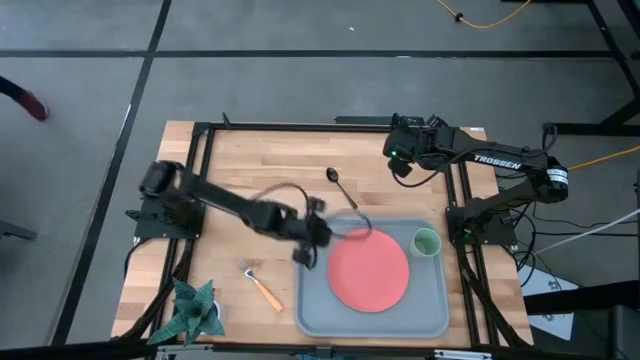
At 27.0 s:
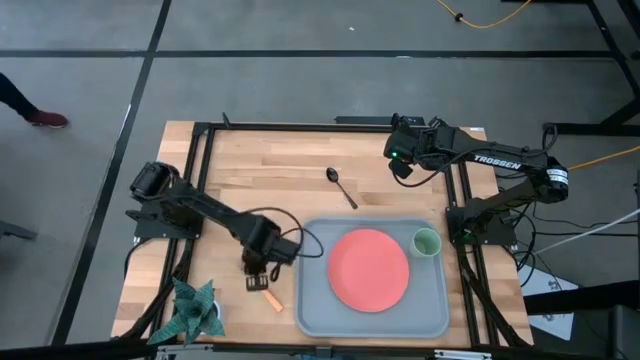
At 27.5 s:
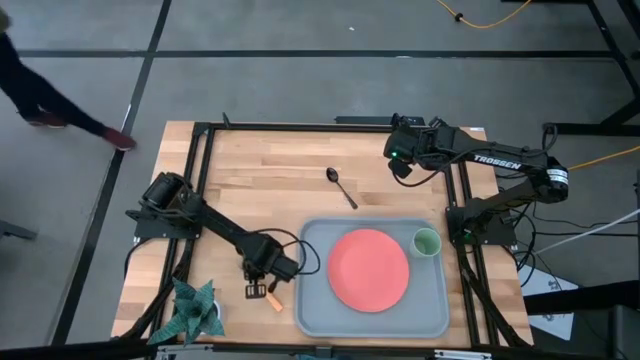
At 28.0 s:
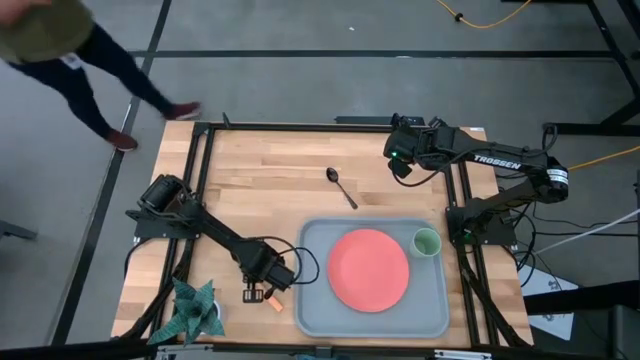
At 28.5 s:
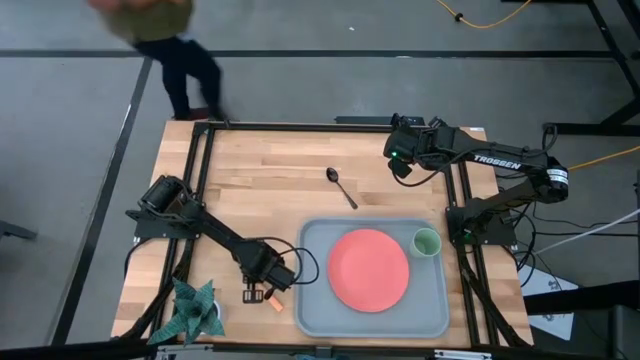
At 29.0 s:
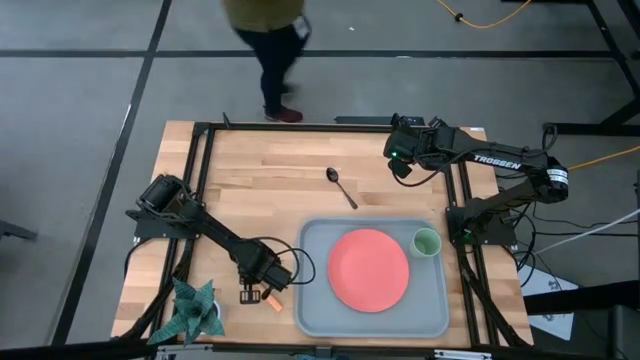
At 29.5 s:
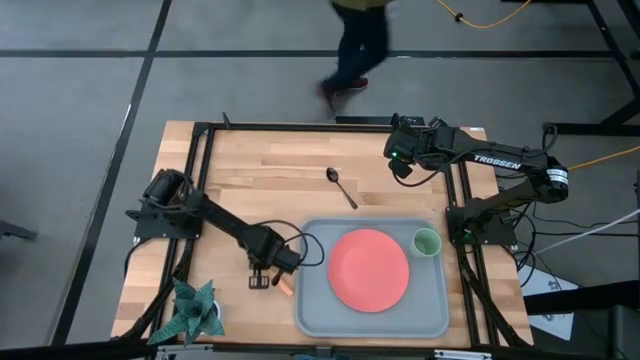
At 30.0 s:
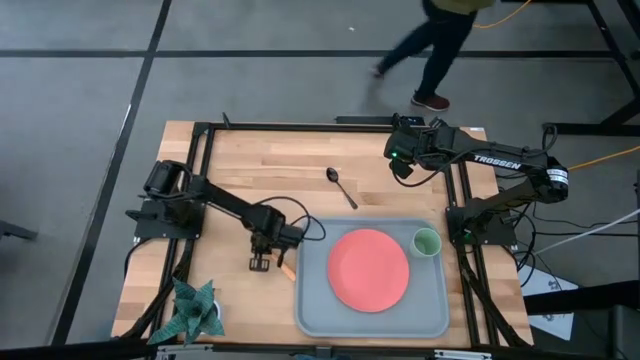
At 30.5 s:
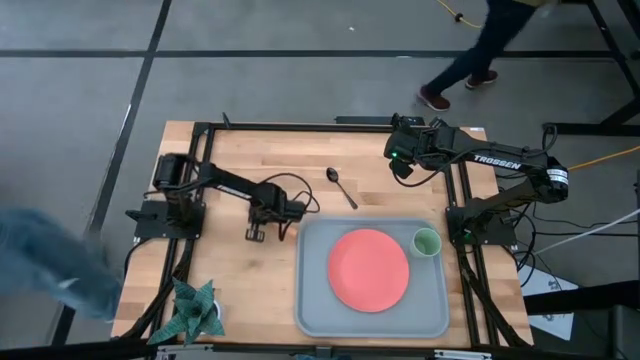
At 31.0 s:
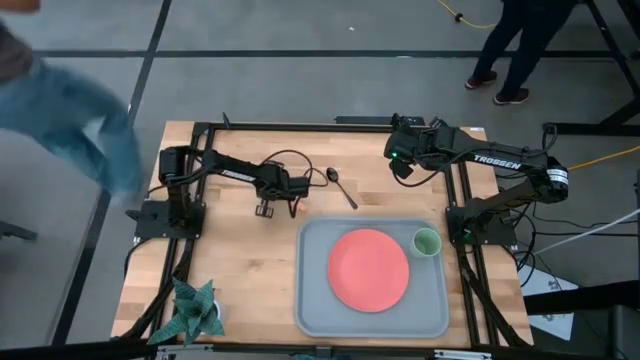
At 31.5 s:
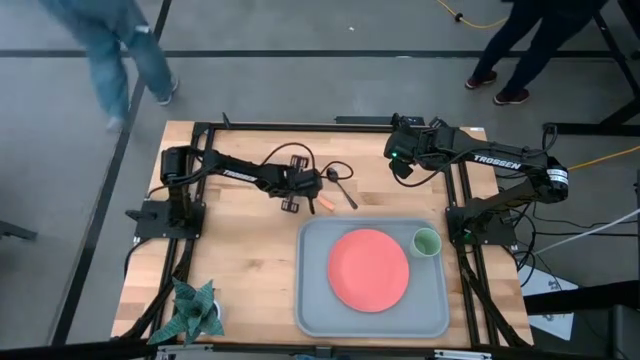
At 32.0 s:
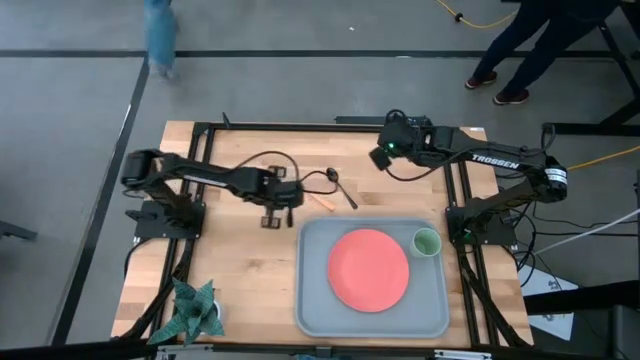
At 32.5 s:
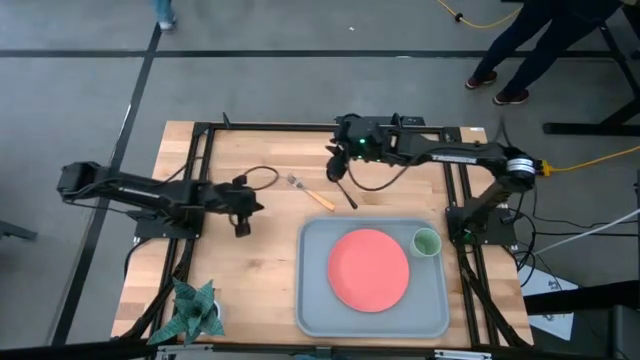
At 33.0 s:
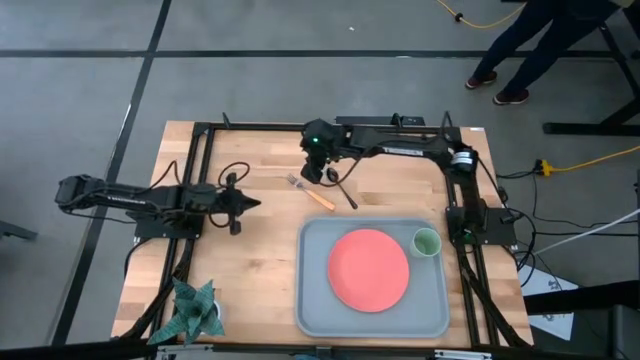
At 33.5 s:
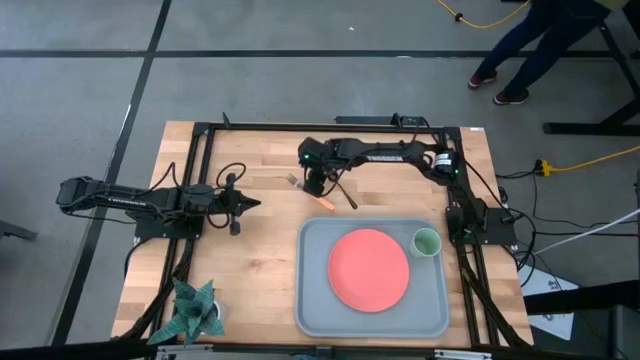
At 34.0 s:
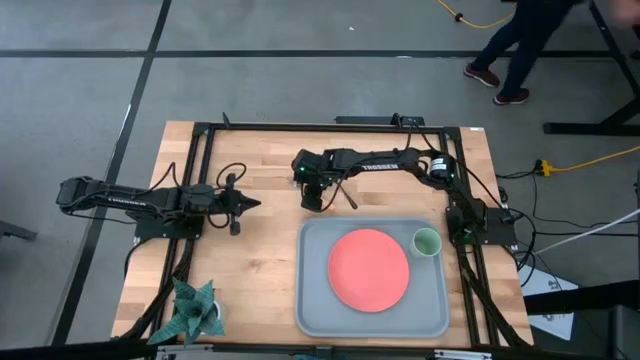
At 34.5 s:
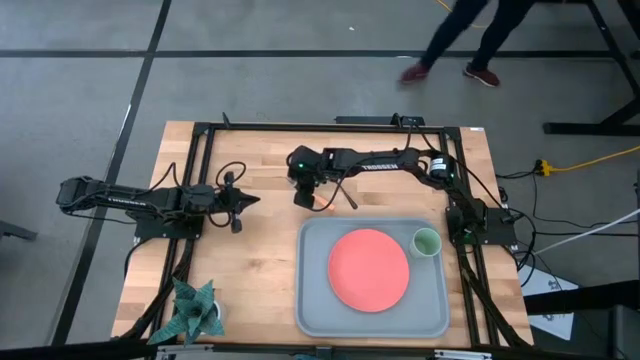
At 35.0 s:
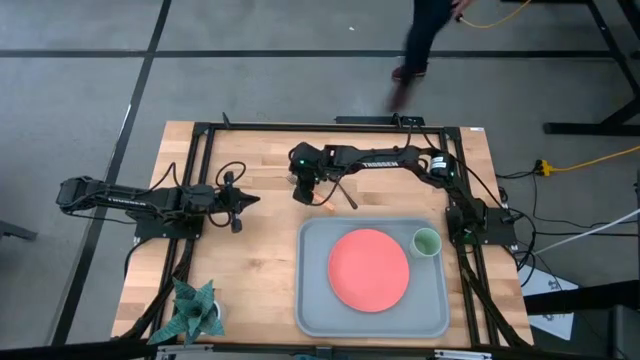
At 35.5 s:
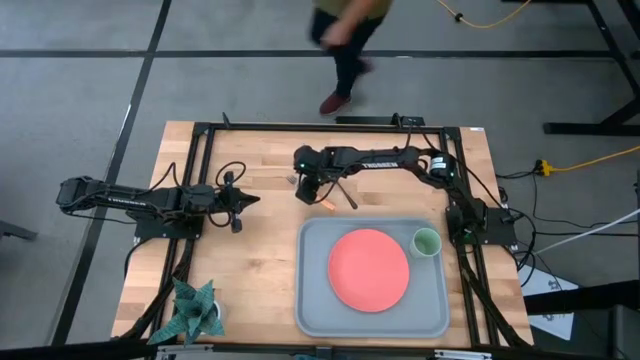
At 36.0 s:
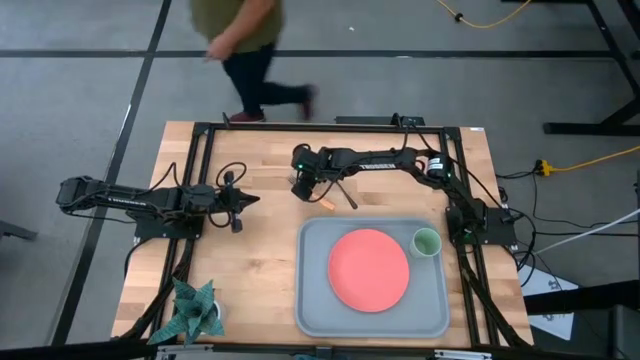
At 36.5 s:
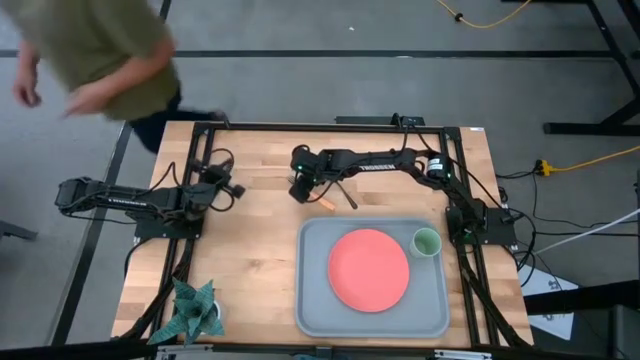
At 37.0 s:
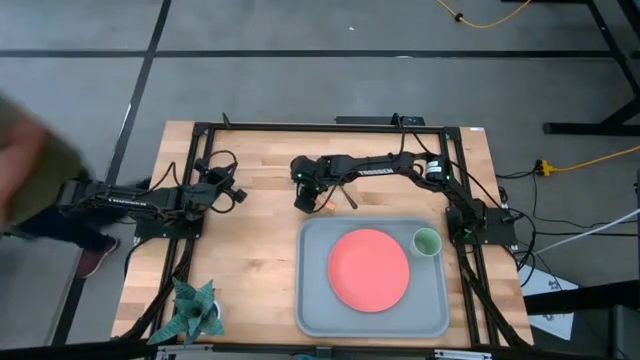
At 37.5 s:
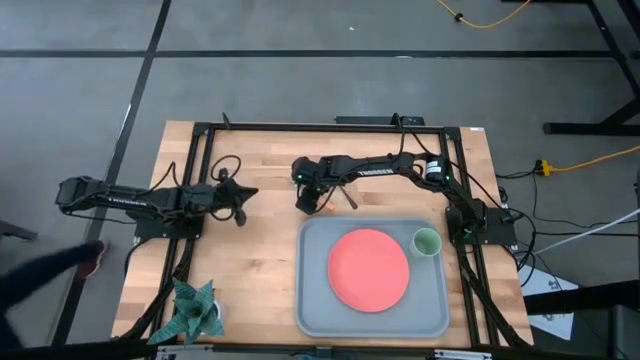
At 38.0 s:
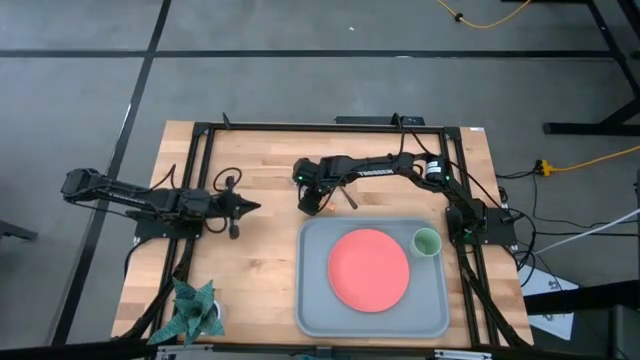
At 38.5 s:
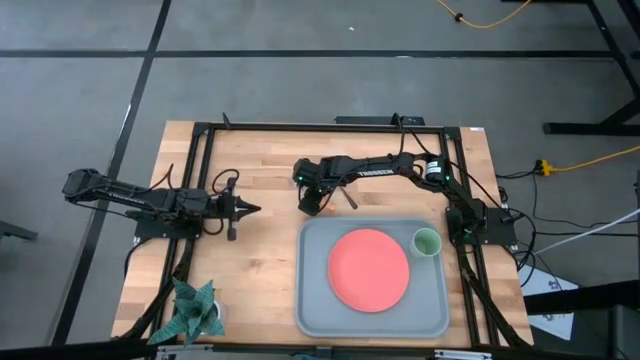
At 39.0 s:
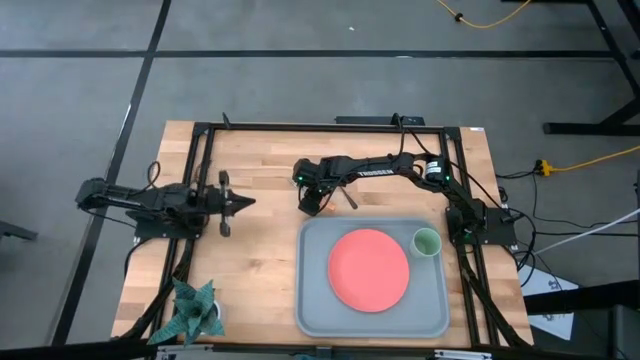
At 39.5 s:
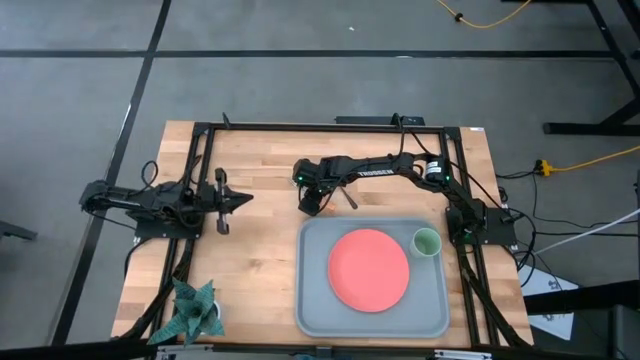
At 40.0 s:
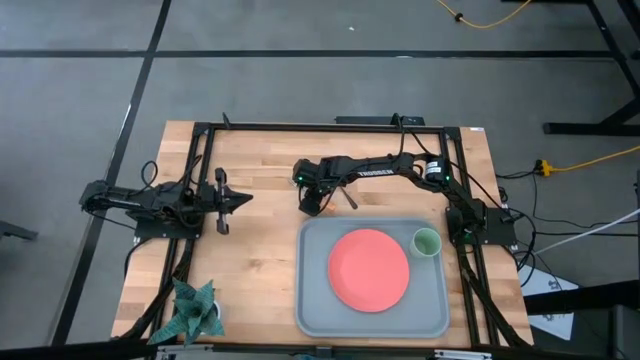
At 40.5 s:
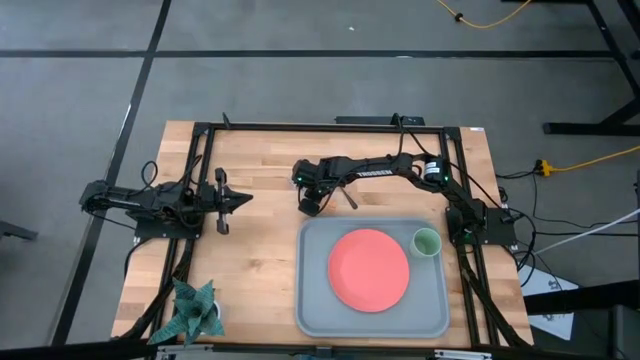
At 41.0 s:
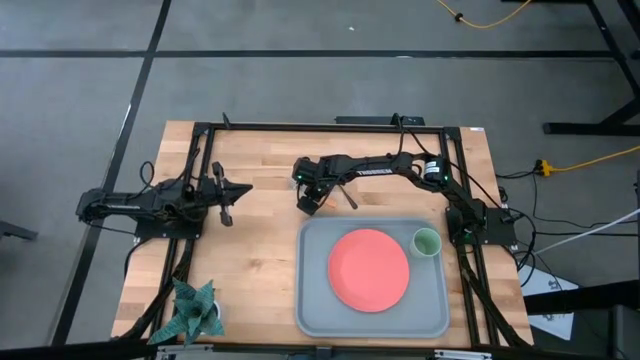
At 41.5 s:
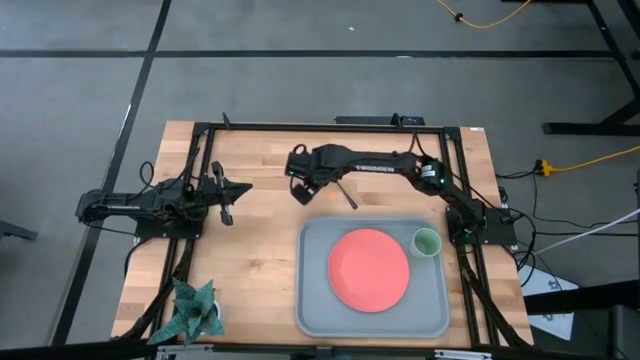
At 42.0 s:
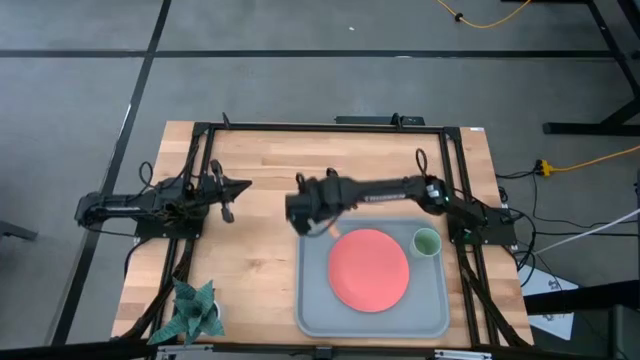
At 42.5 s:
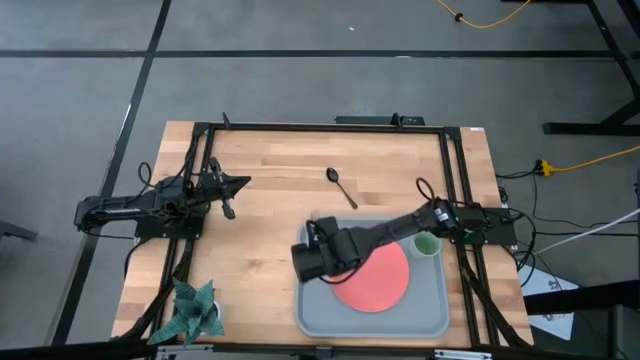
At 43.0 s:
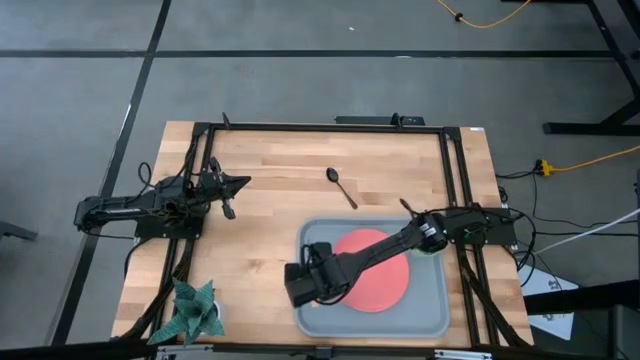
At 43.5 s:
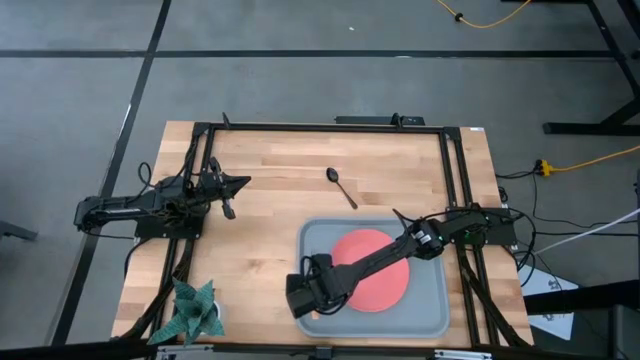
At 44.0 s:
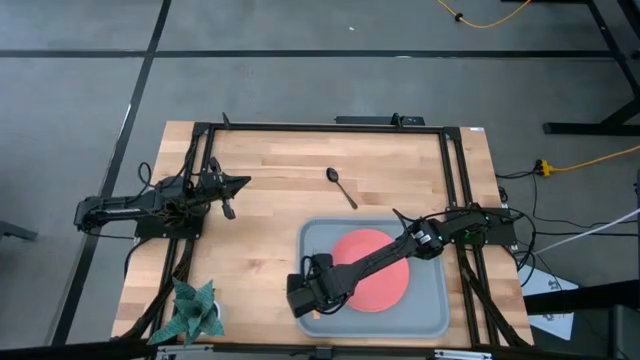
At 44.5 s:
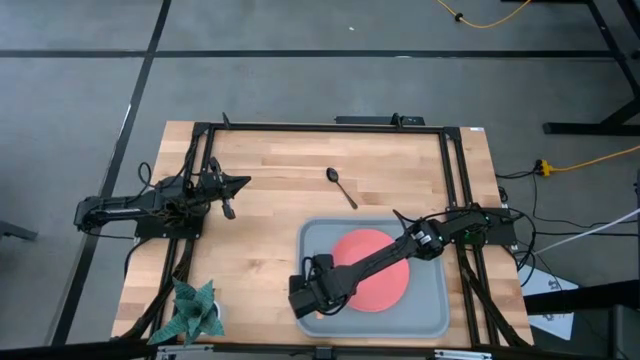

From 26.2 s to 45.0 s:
Task: Pick and place plate/cup/fork/spoon on tray
Put the fork on the left side of the pink plate on the light blue tray
